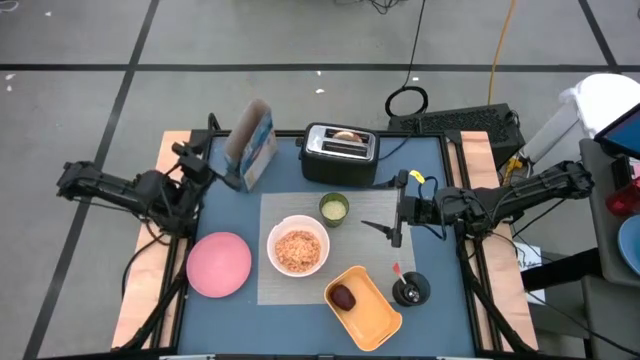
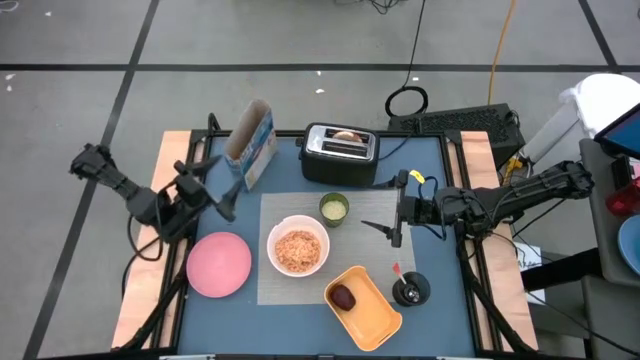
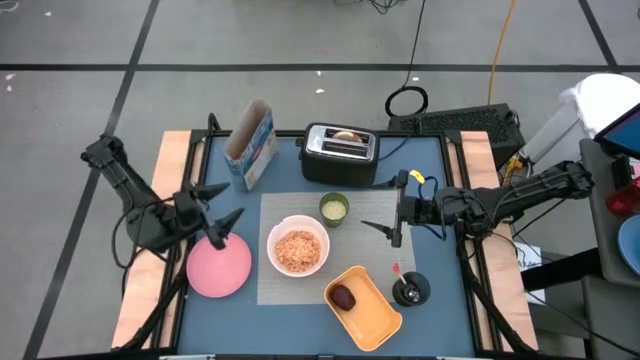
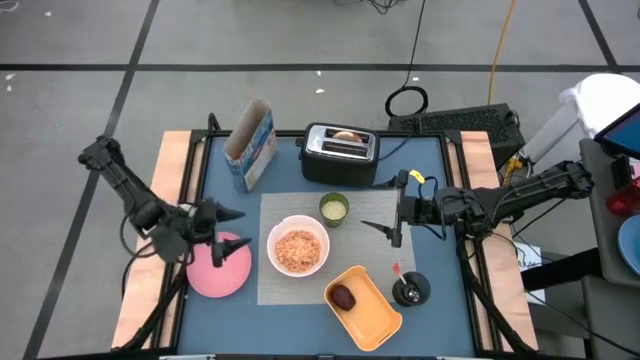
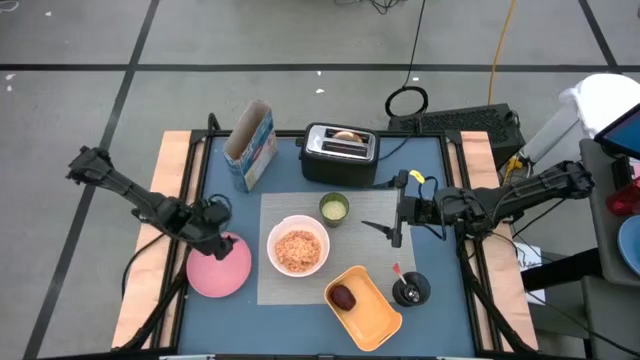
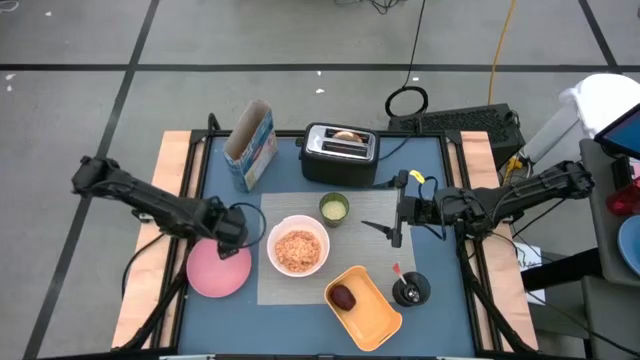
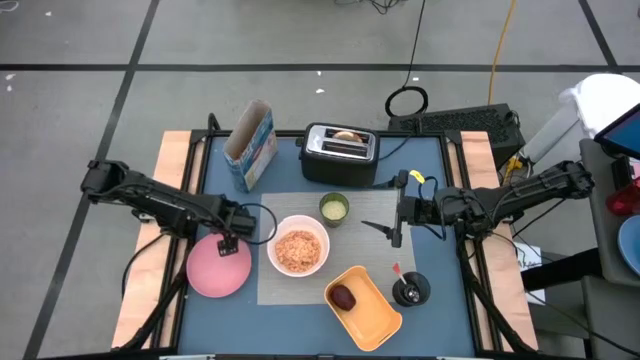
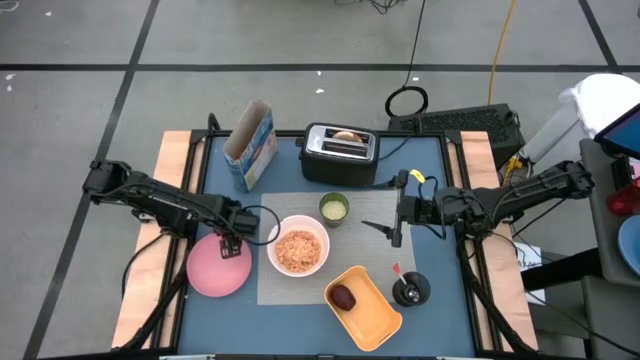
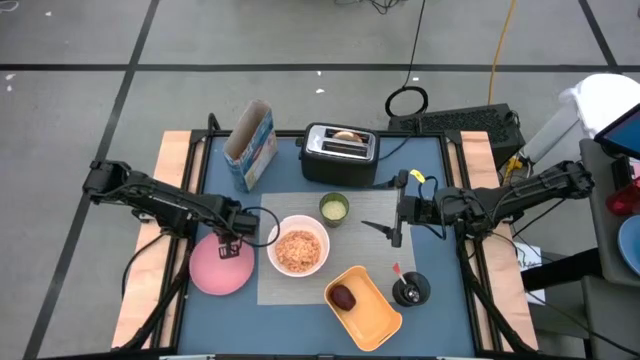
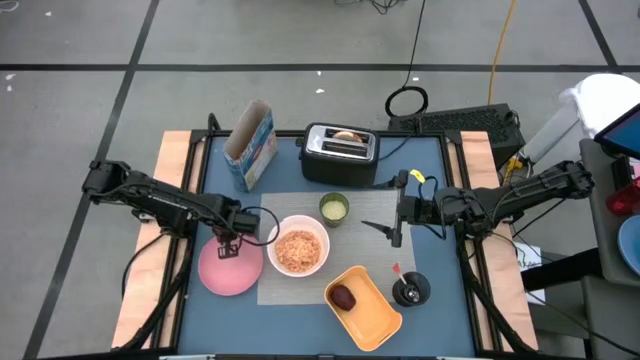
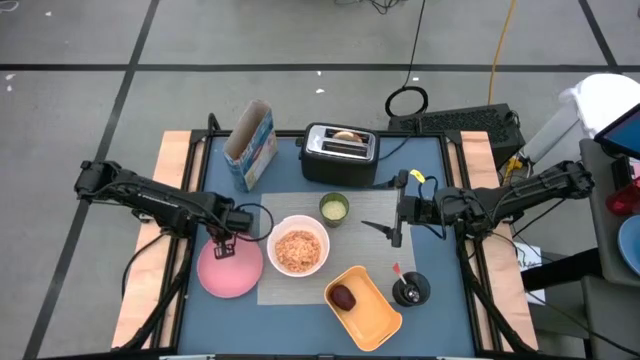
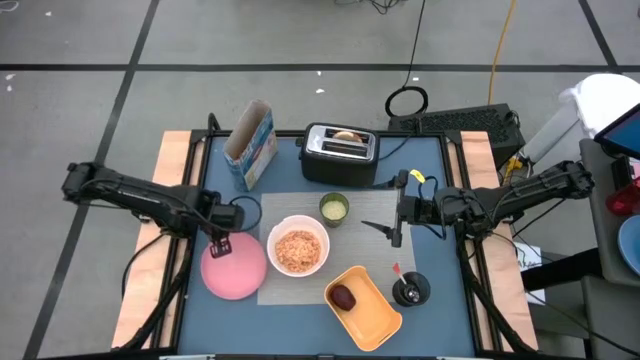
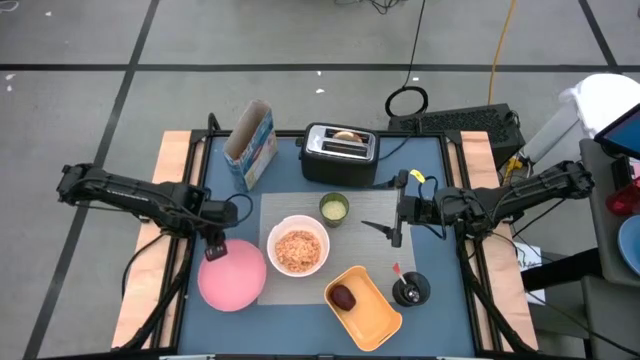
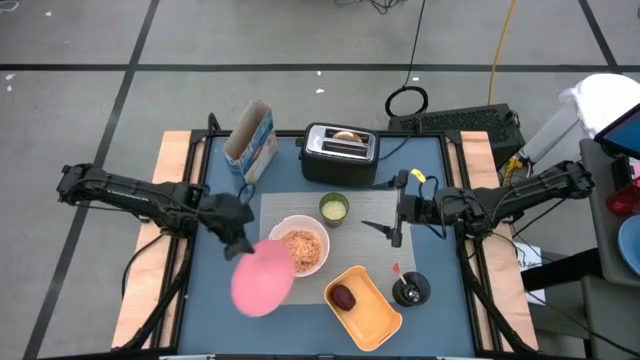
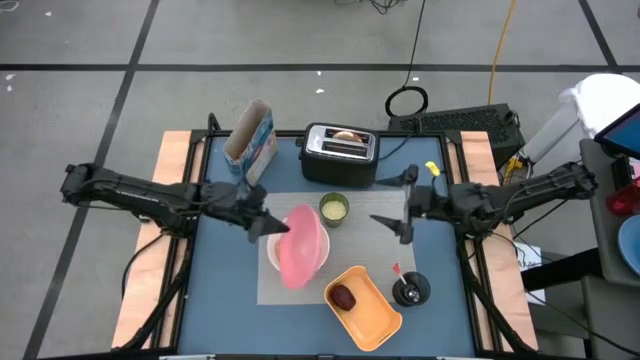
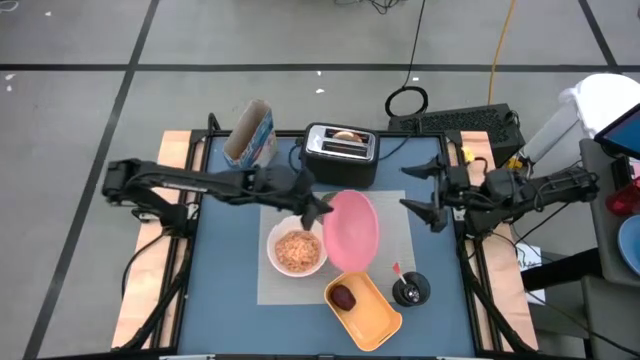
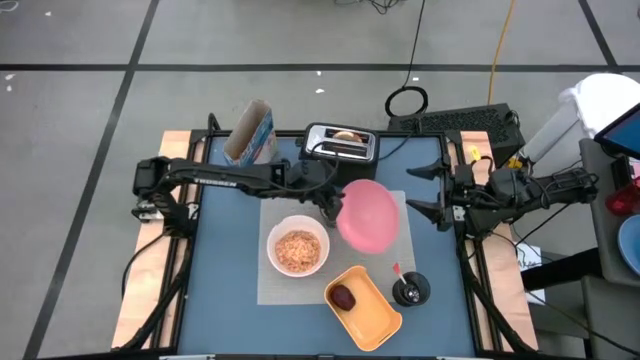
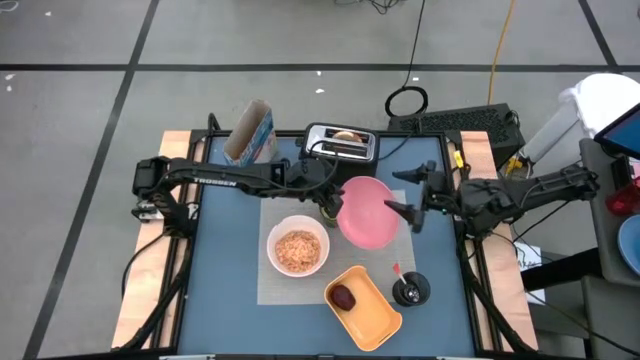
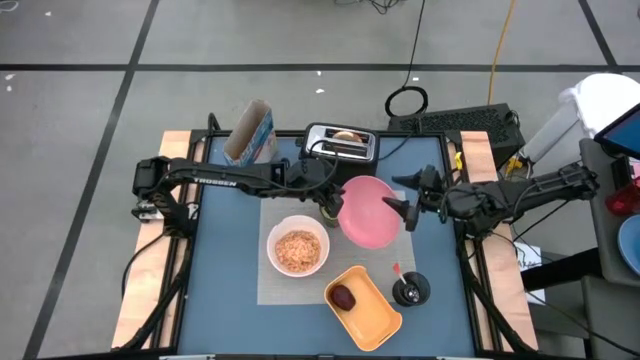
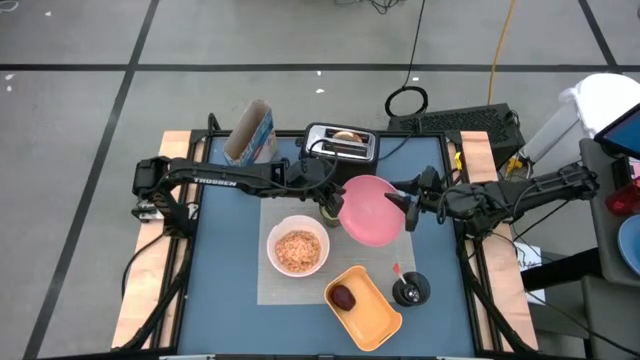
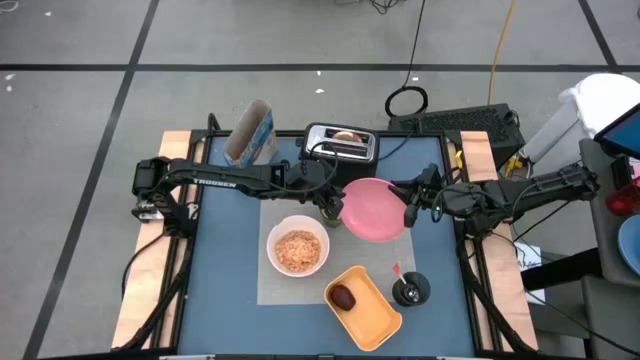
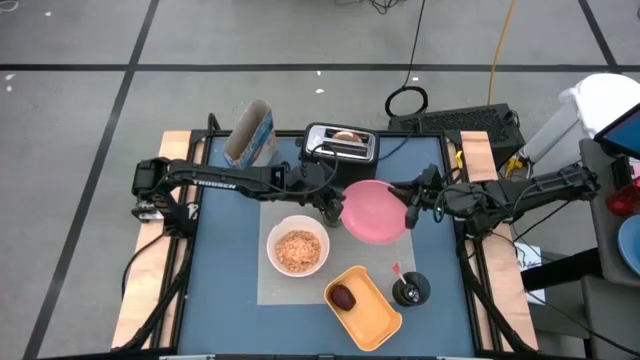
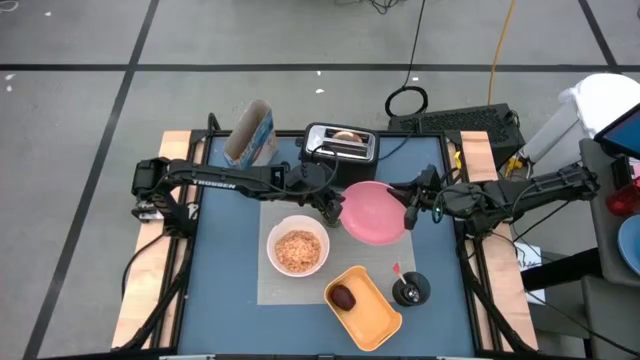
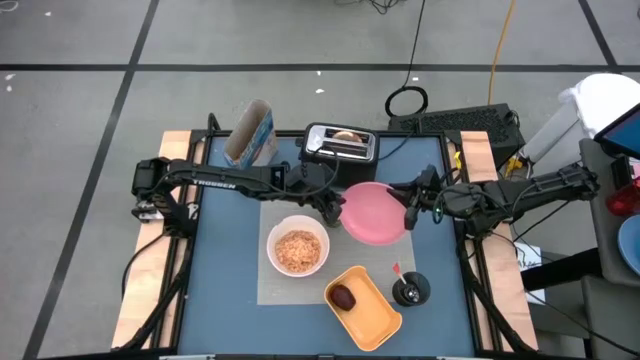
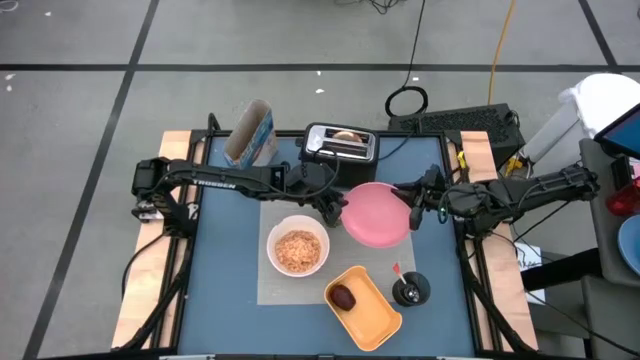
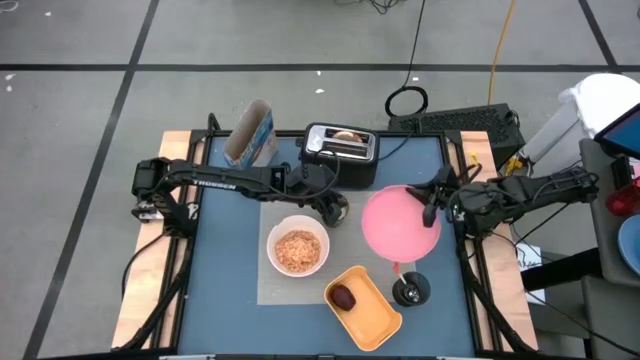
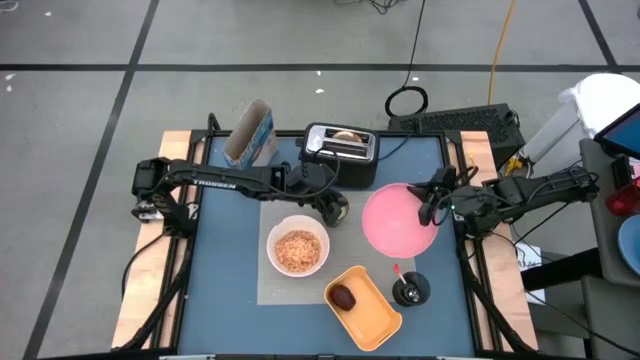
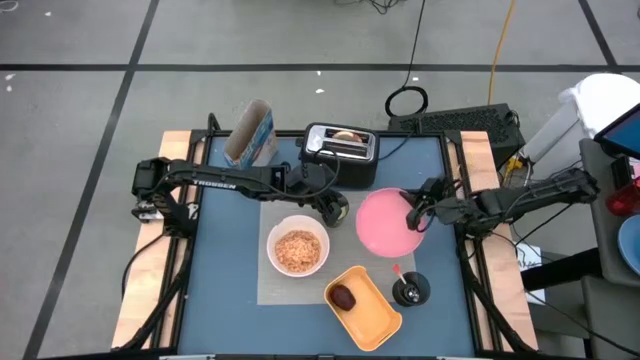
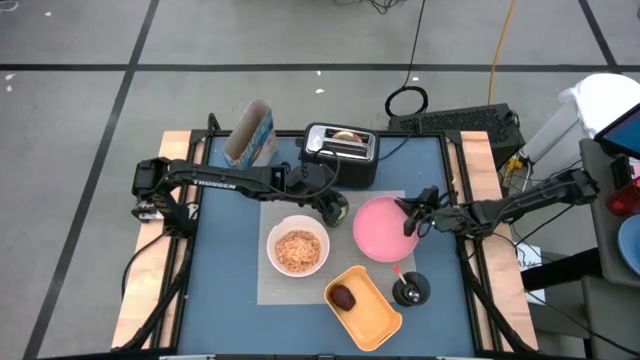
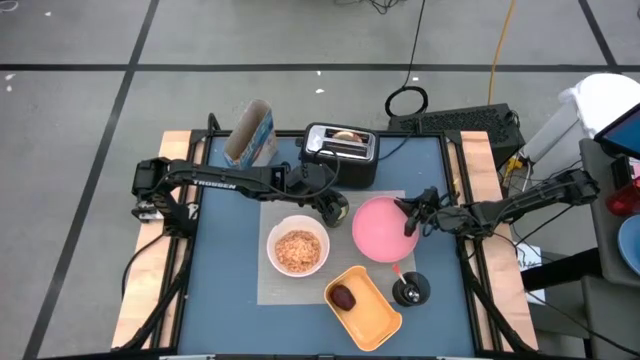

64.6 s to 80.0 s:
Task: Arrange a breakfast setting
Put the pink plate on the gray table mat to the bottom right of the green cup

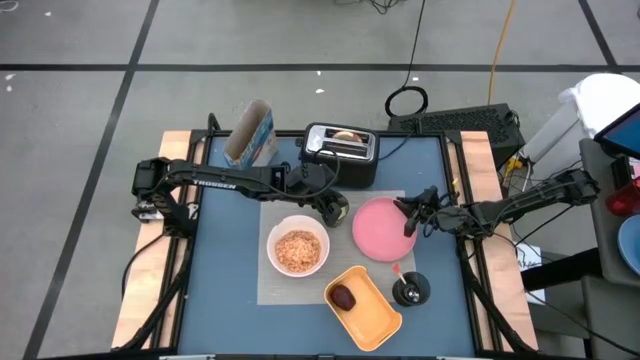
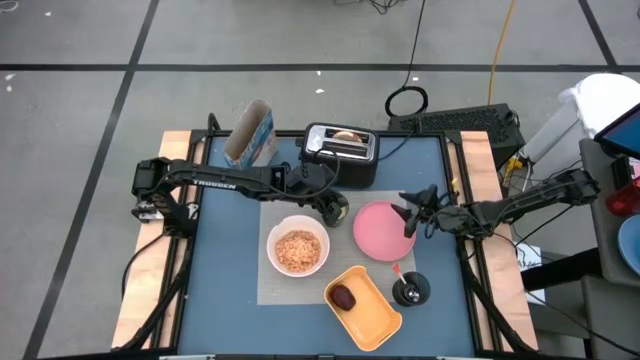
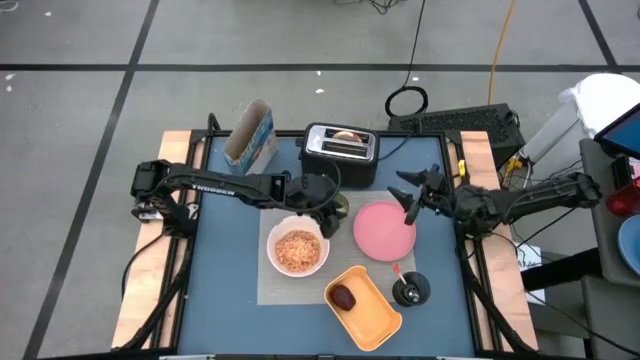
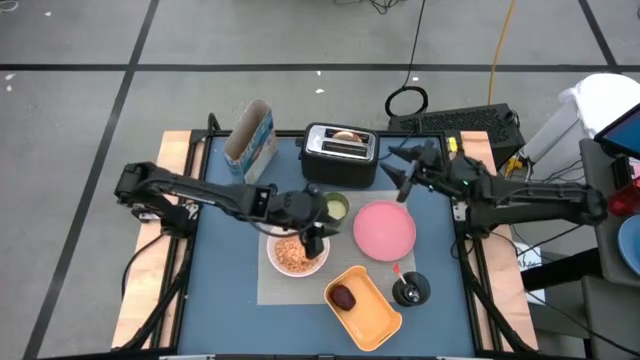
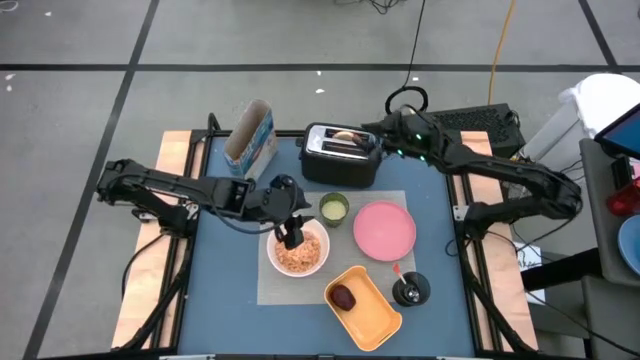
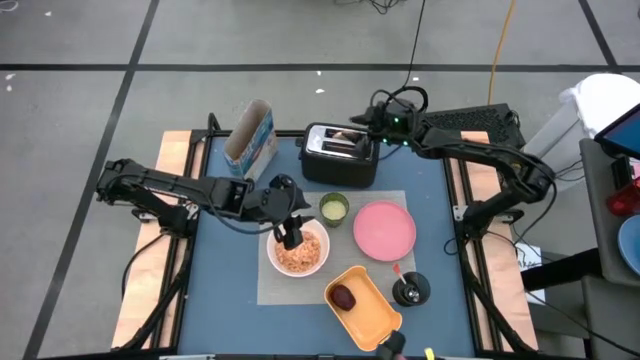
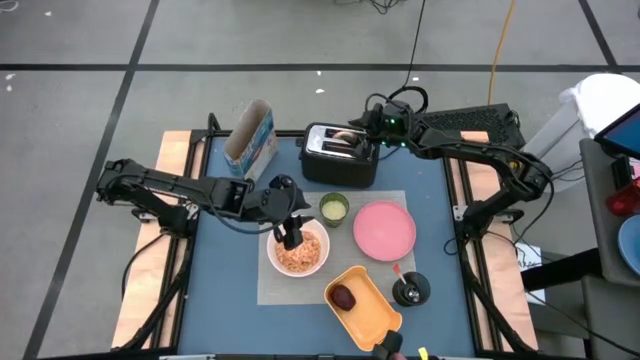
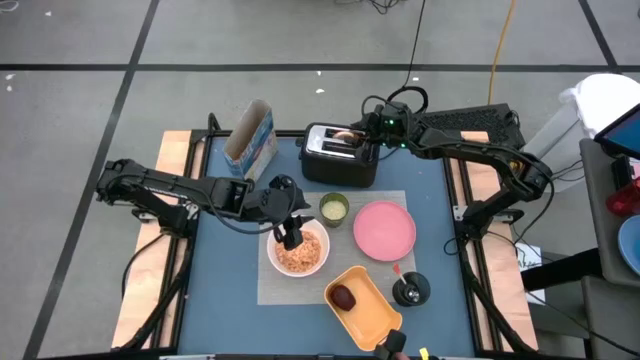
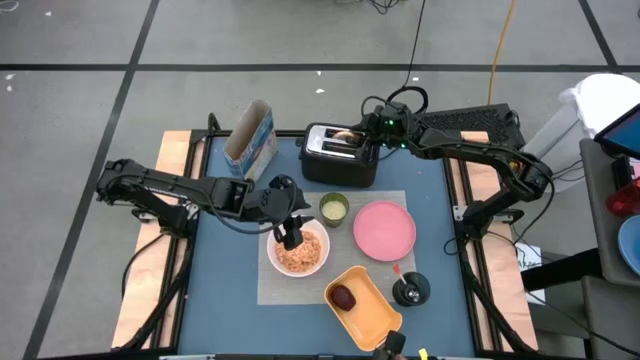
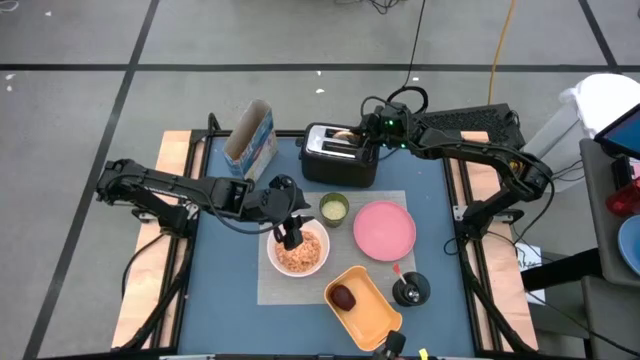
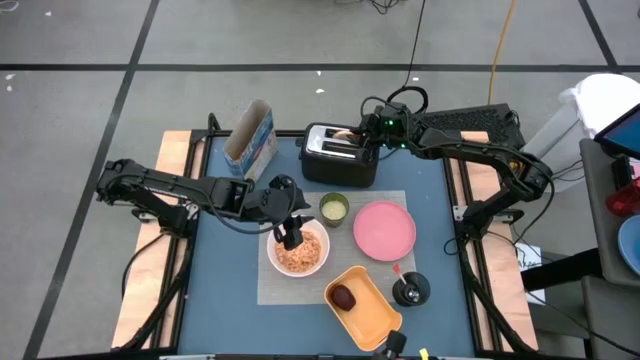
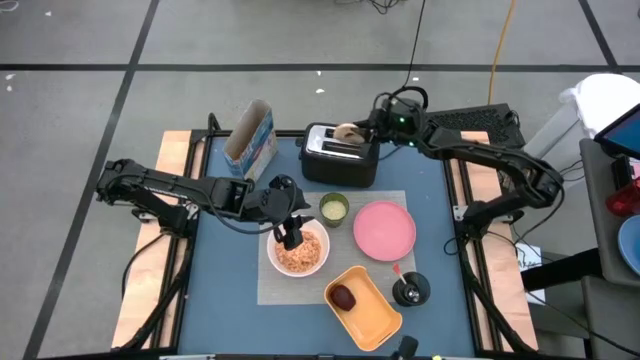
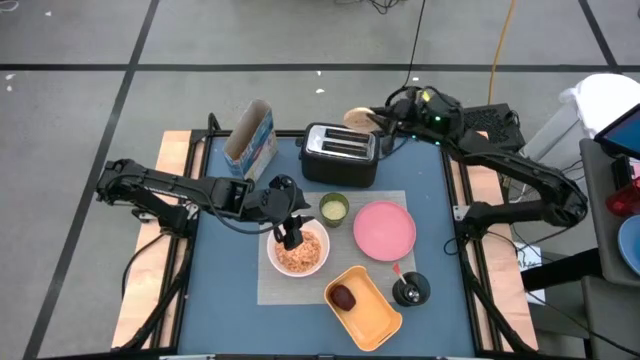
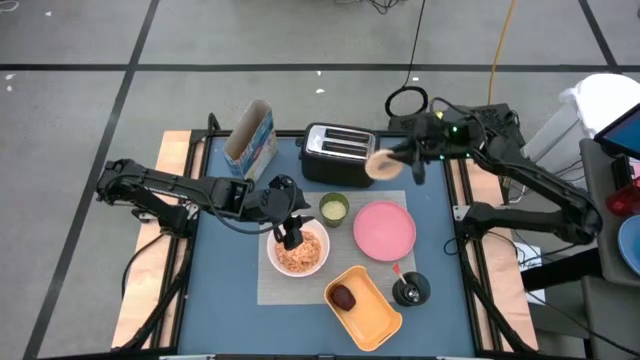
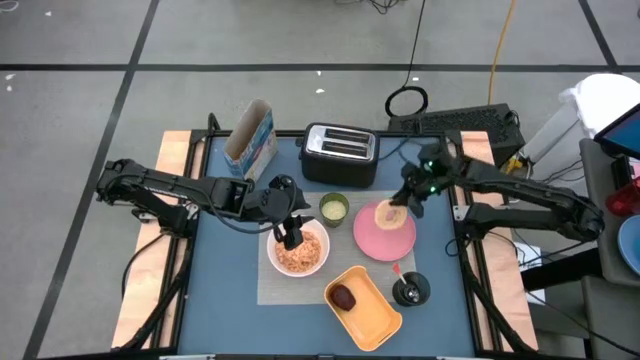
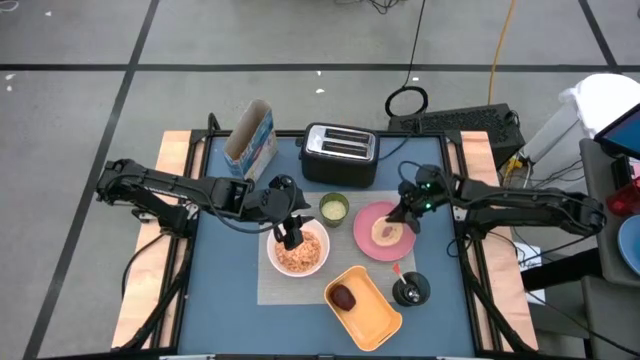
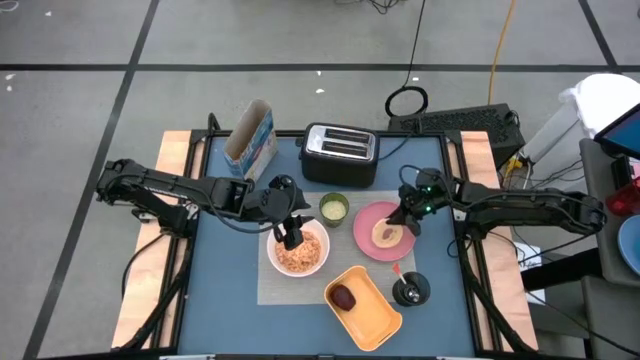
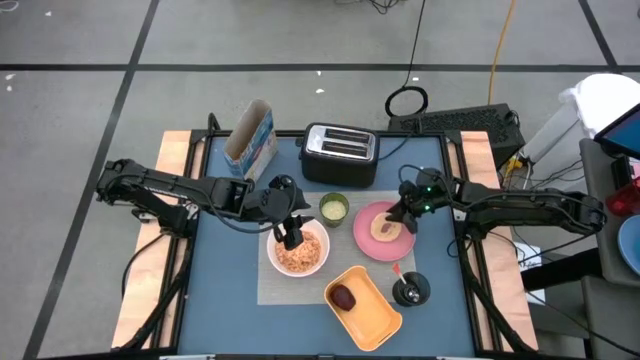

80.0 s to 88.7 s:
Put the bagel on the pink plate
